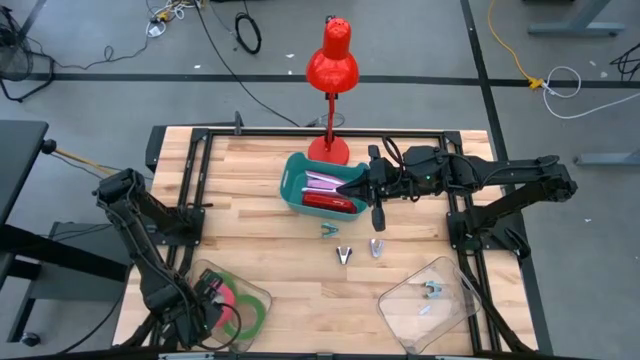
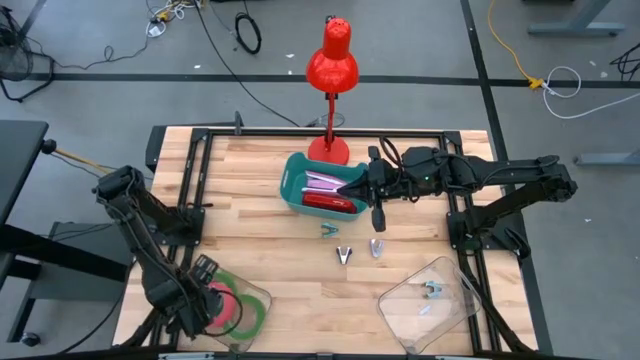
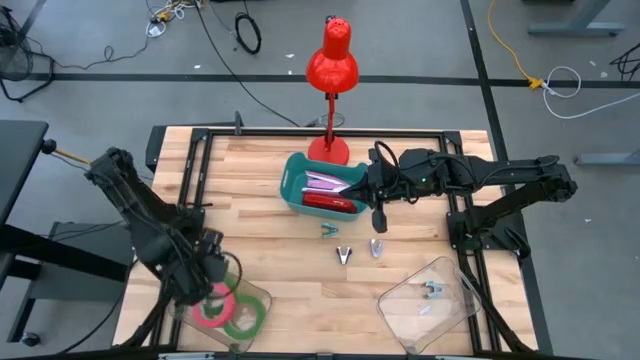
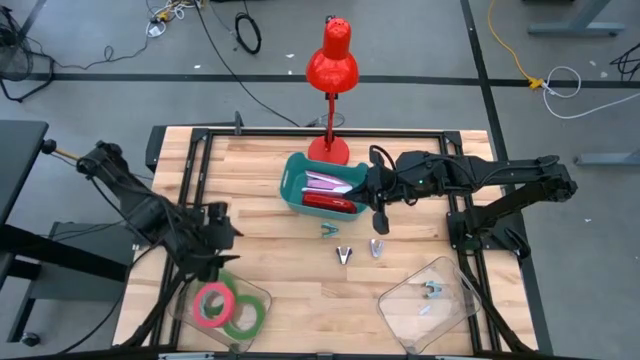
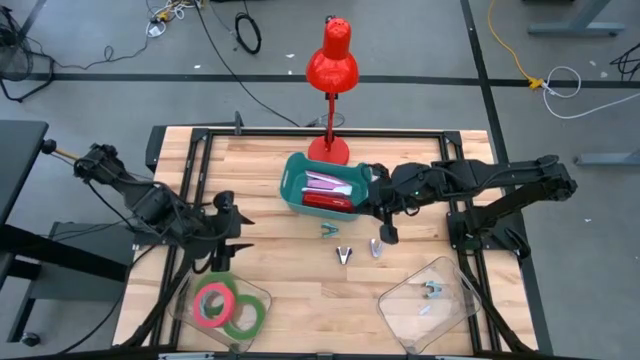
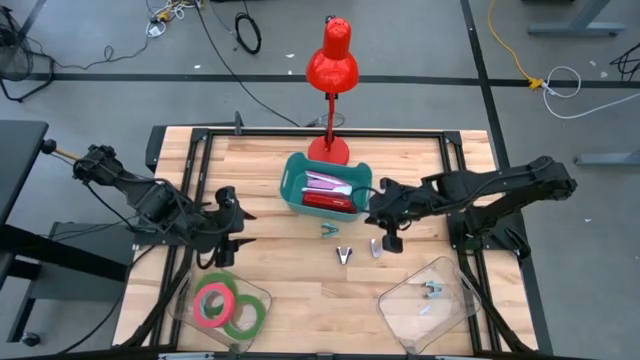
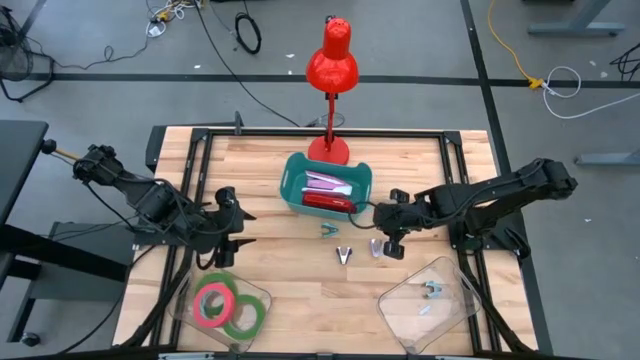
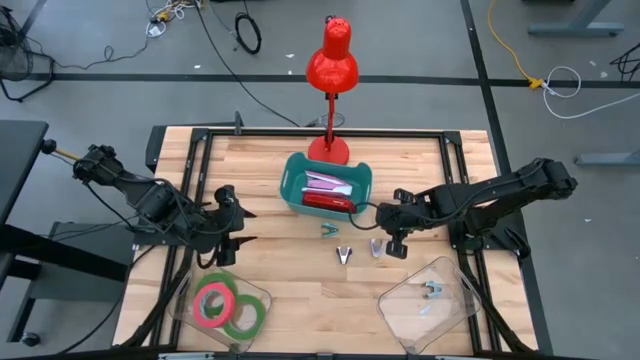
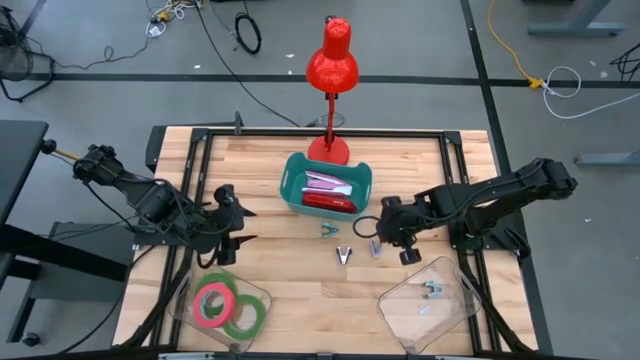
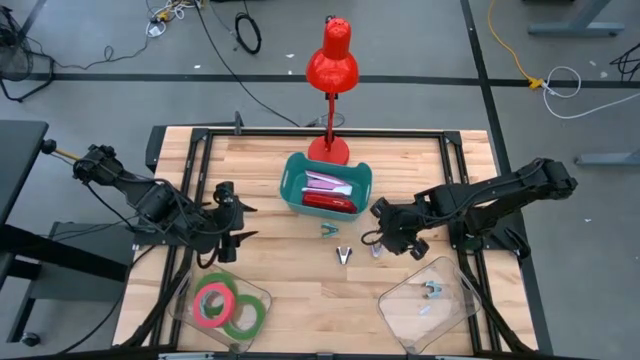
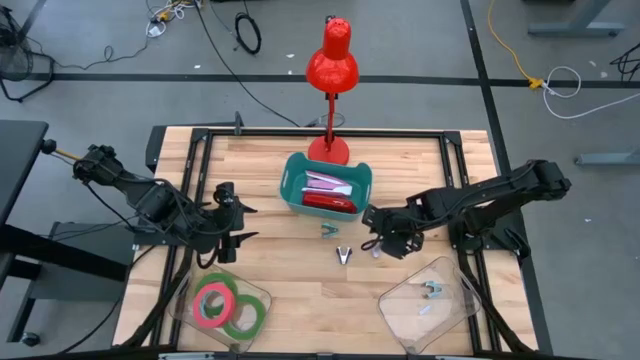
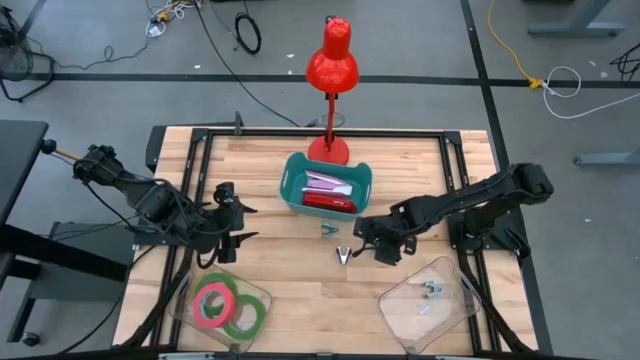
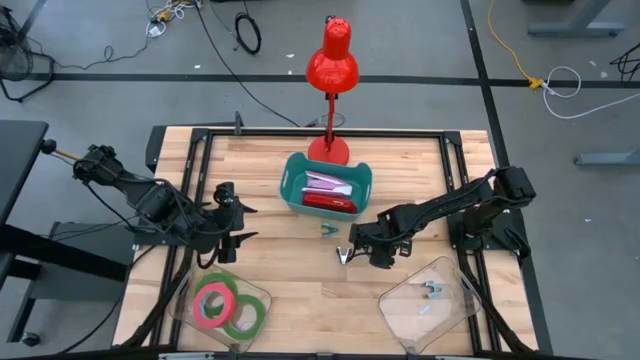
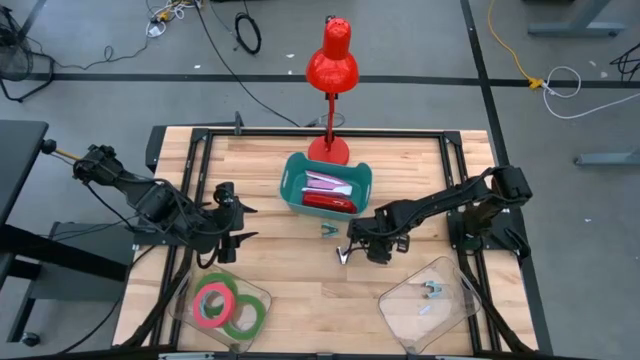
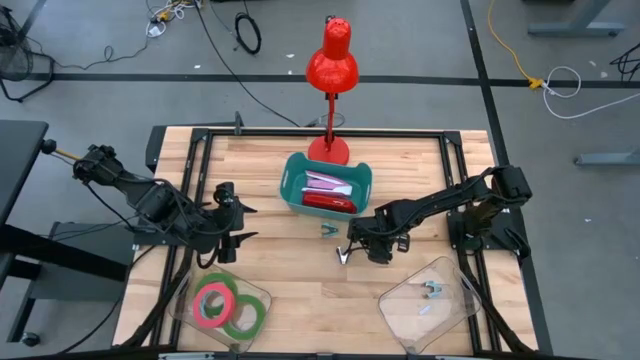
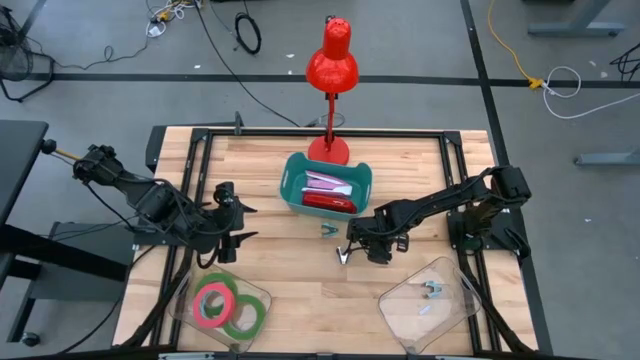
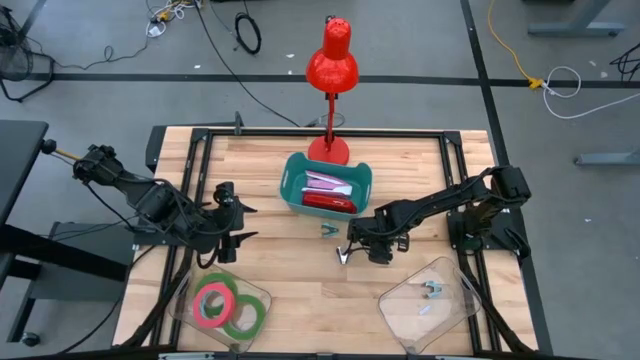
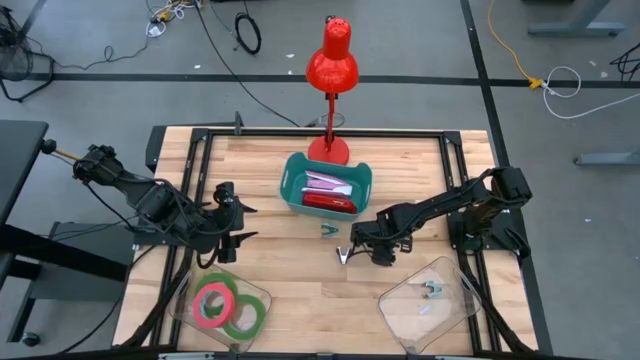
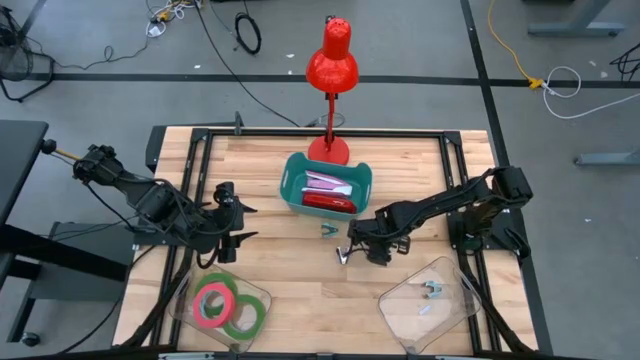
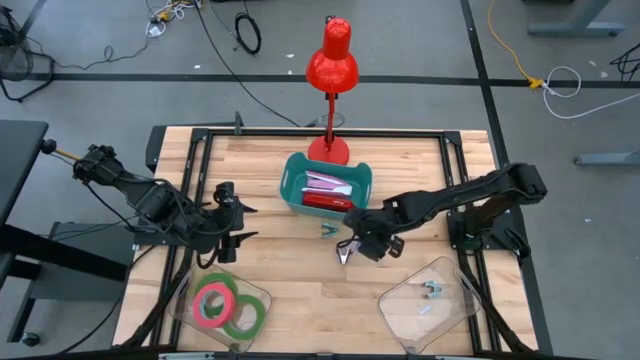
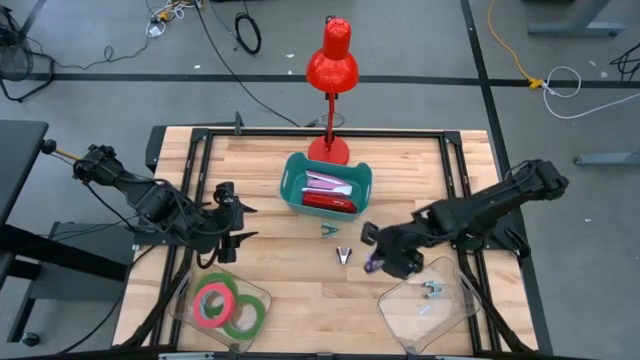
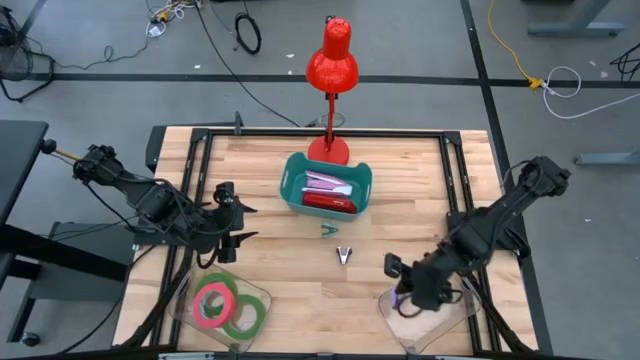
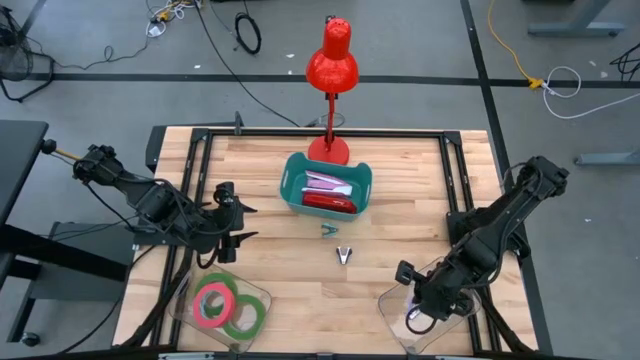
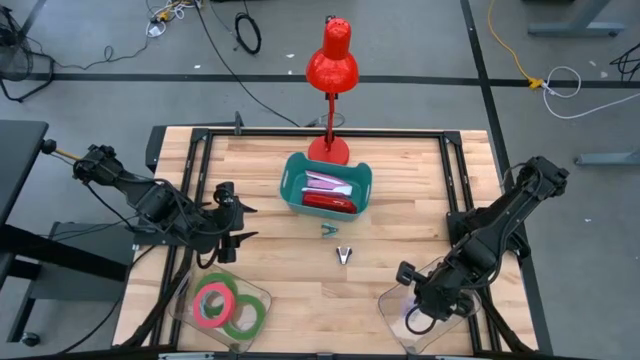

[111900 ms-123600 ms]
Task: Pick and place Stapler, Stapler remover, tape
Put the purple staple remover in the right transparent bin

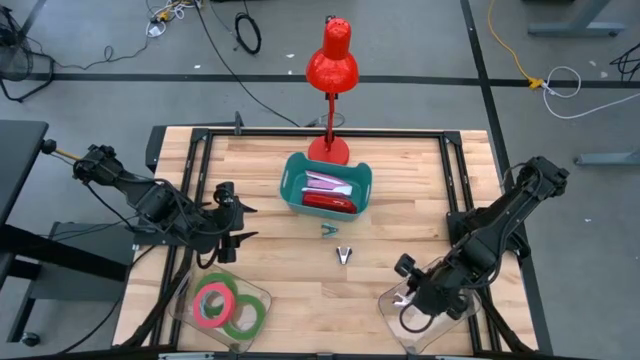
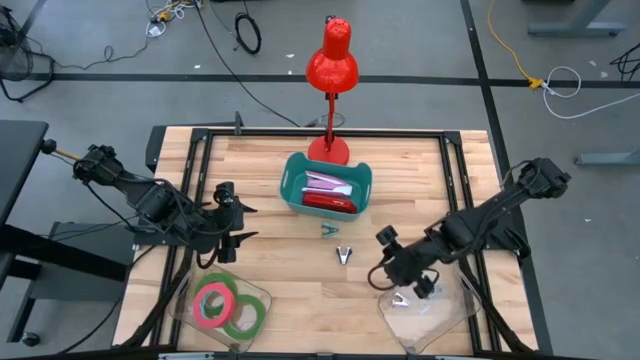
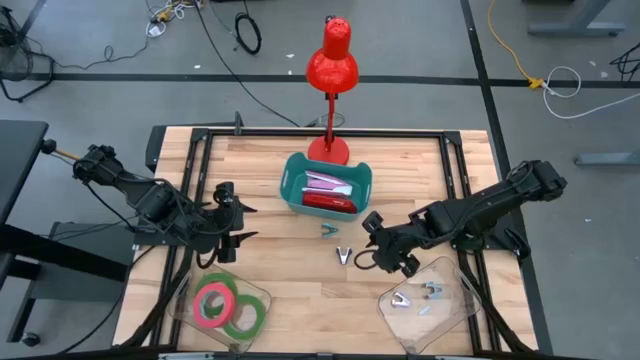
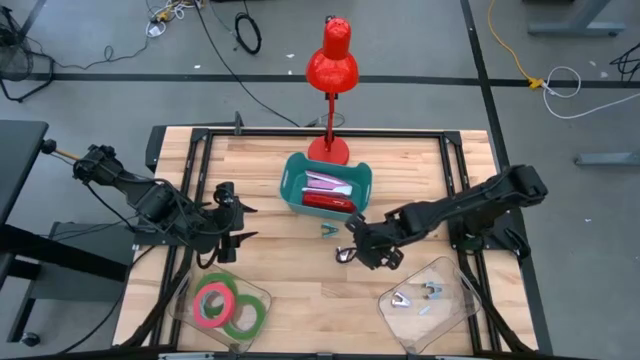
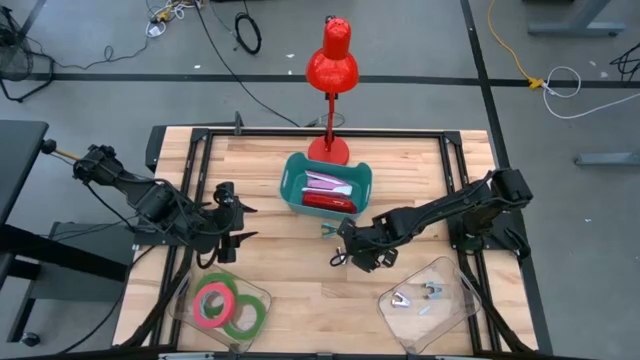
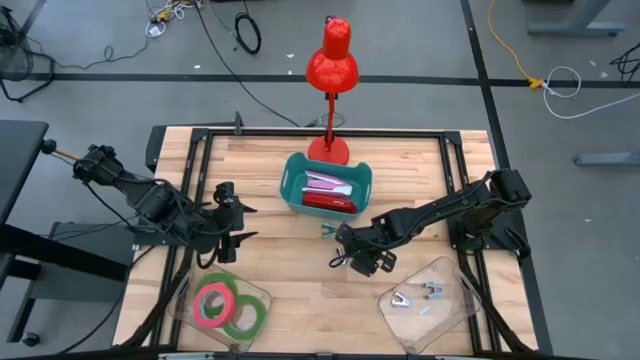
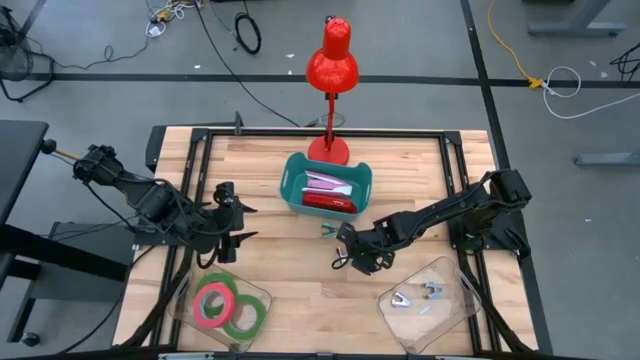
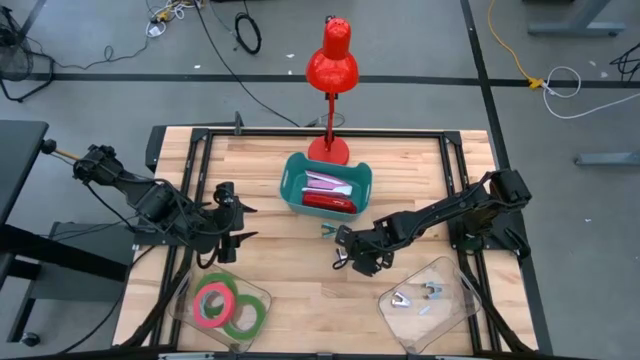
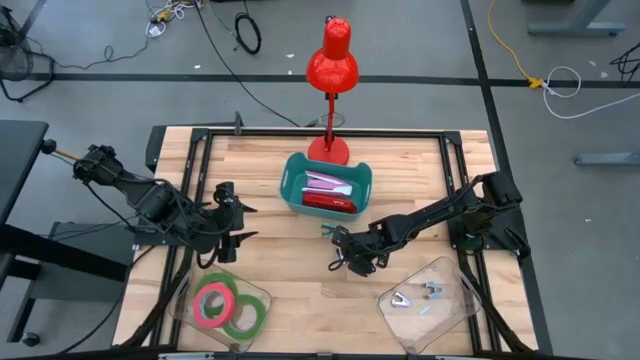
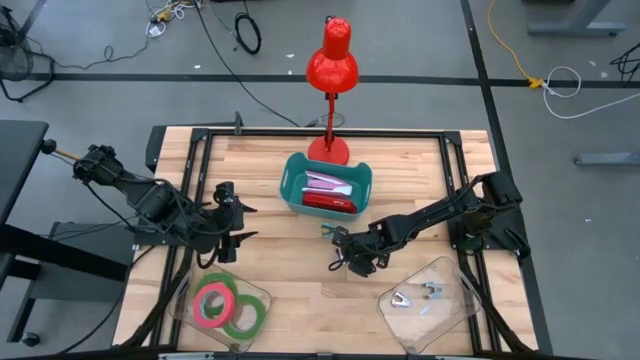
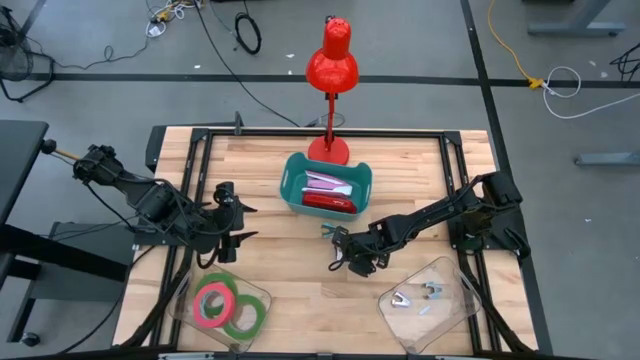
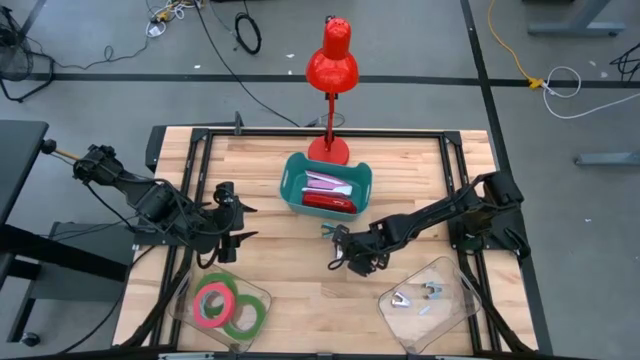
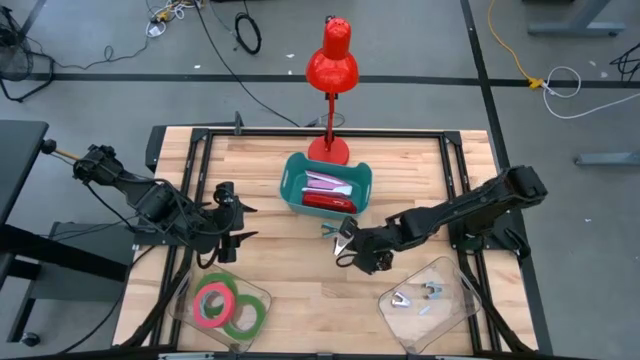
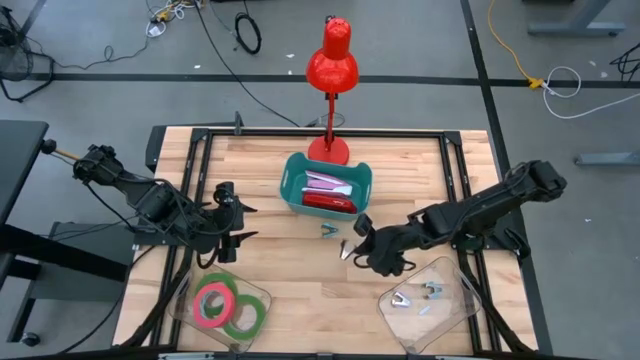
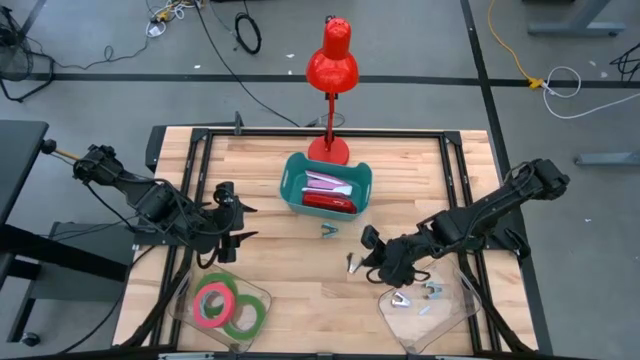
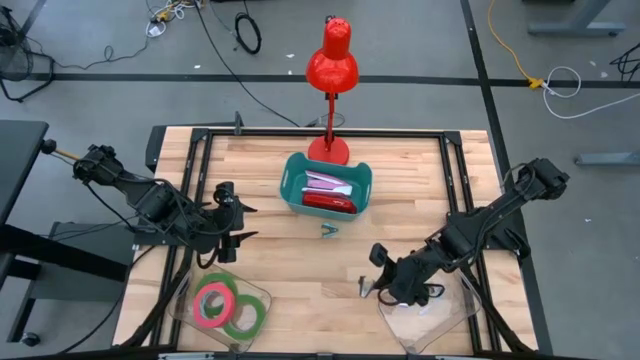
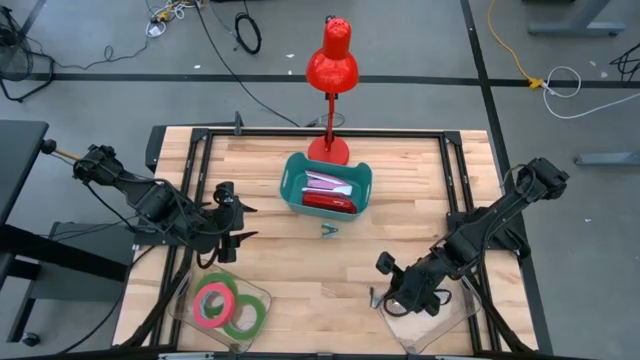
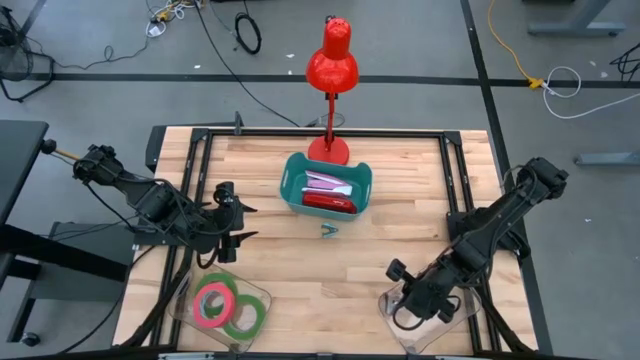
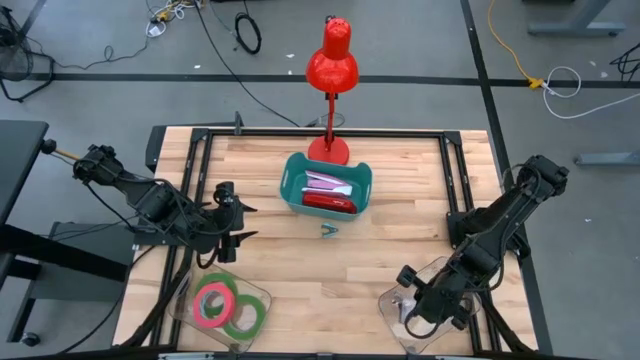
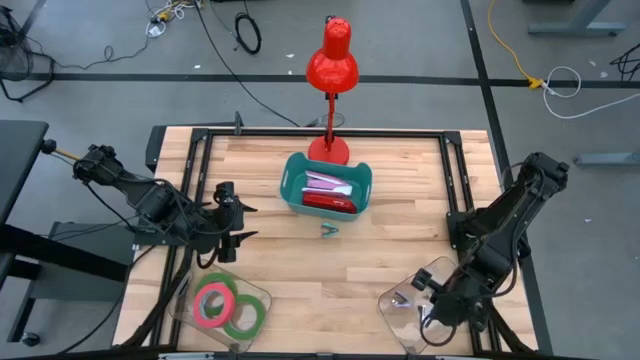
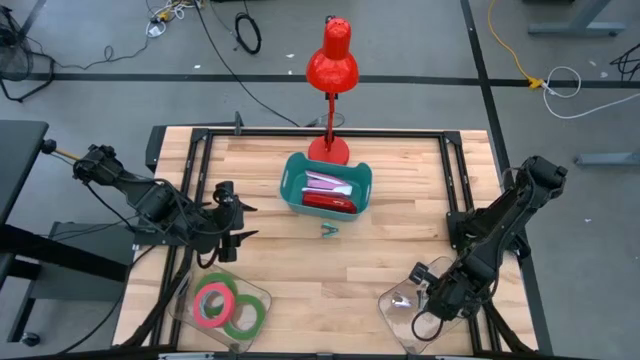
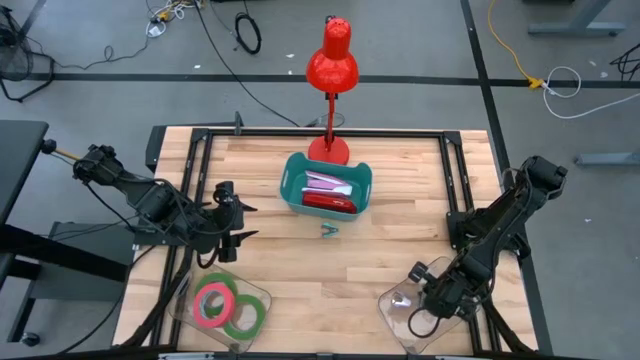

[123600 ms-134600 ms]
Put the black staple remover in the right transparent bin
